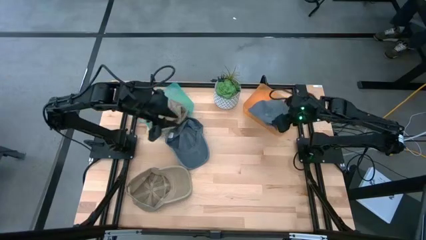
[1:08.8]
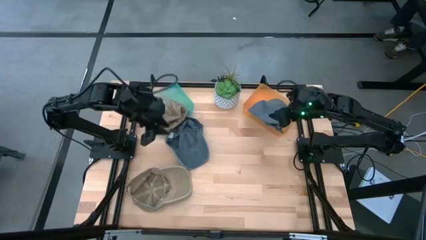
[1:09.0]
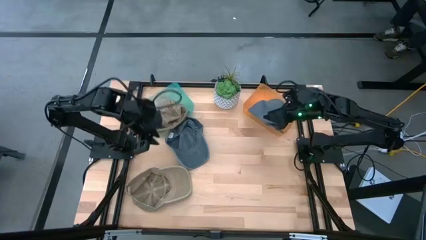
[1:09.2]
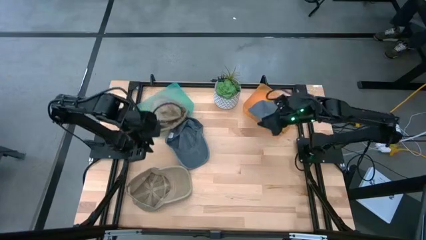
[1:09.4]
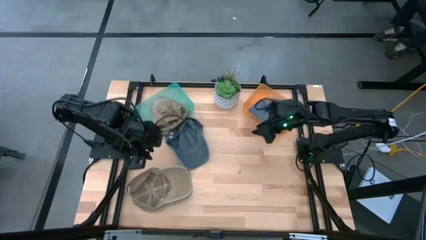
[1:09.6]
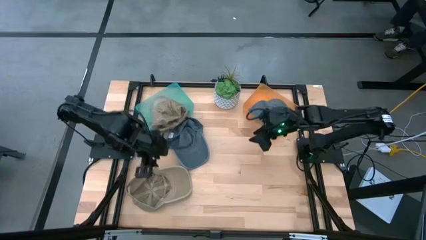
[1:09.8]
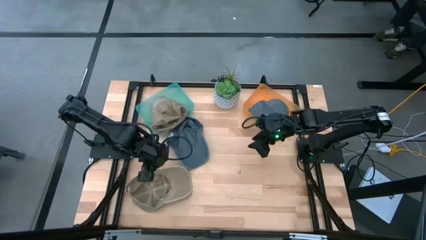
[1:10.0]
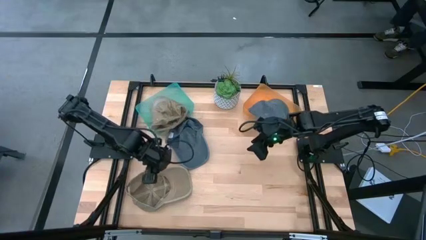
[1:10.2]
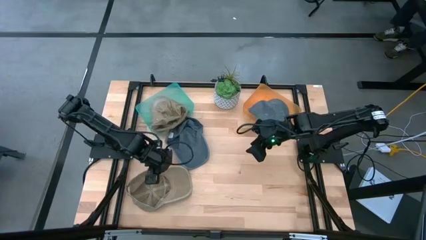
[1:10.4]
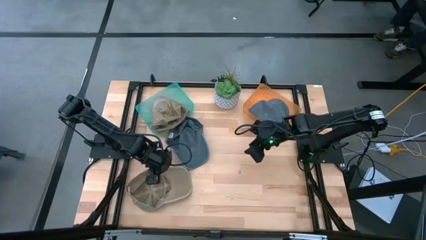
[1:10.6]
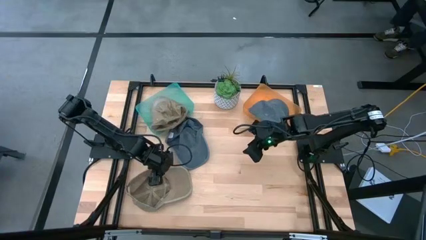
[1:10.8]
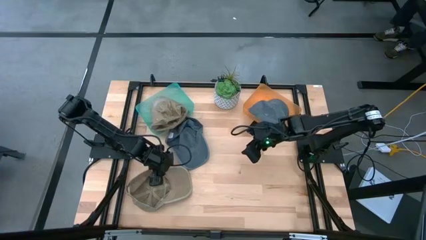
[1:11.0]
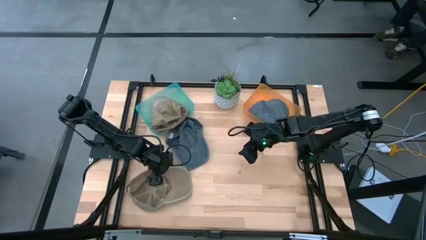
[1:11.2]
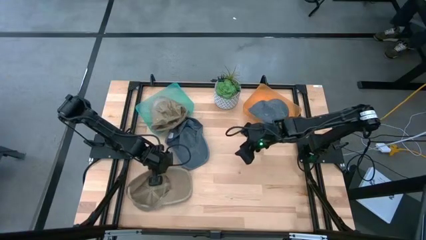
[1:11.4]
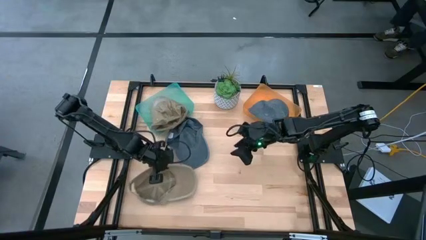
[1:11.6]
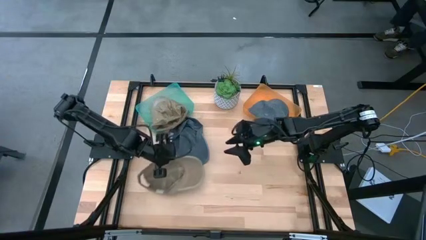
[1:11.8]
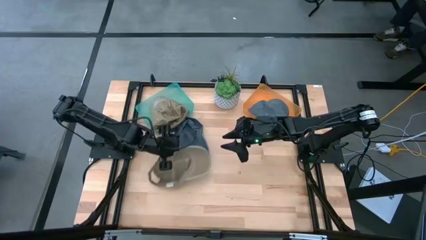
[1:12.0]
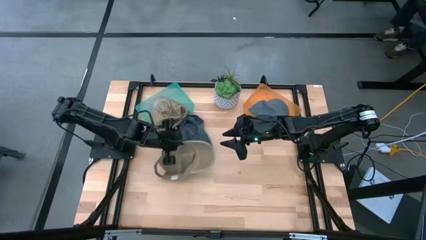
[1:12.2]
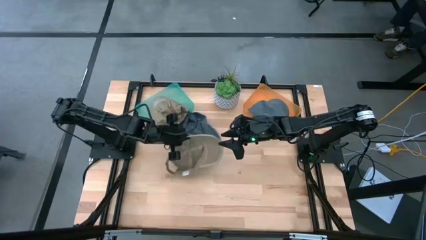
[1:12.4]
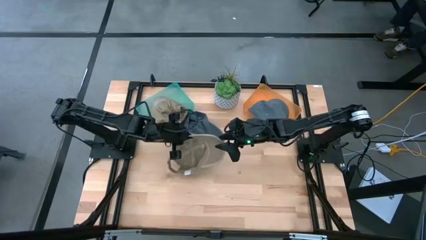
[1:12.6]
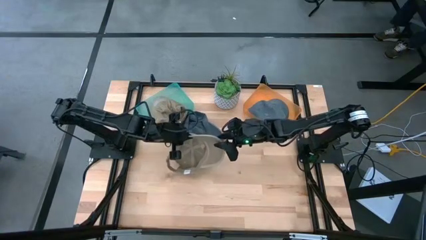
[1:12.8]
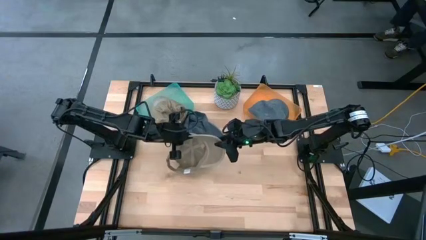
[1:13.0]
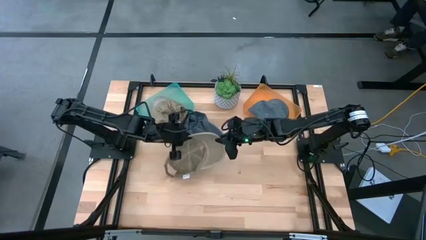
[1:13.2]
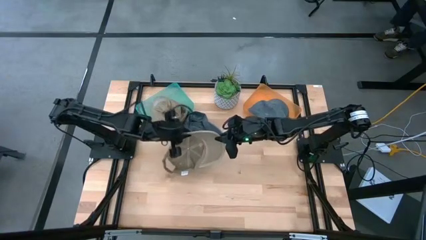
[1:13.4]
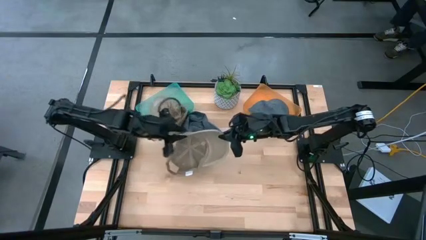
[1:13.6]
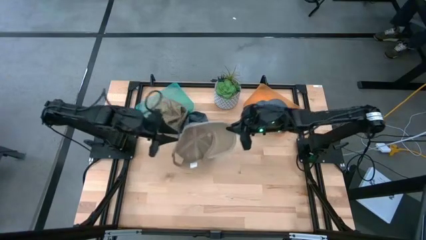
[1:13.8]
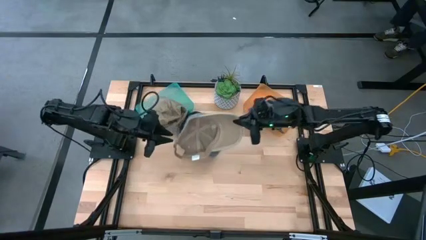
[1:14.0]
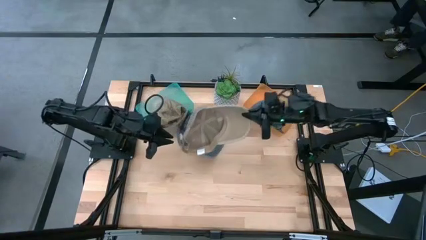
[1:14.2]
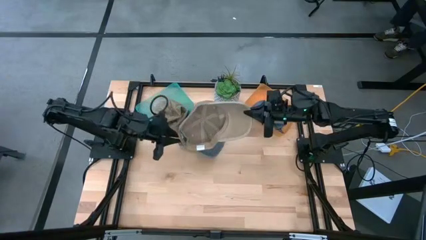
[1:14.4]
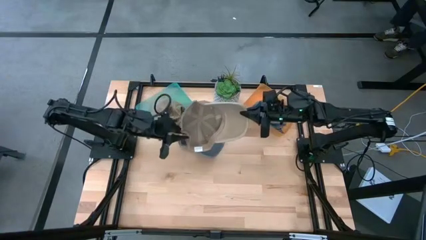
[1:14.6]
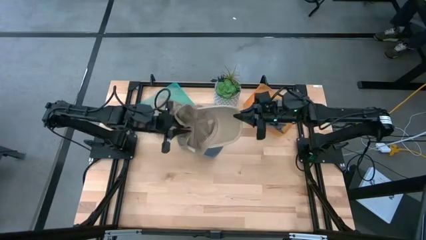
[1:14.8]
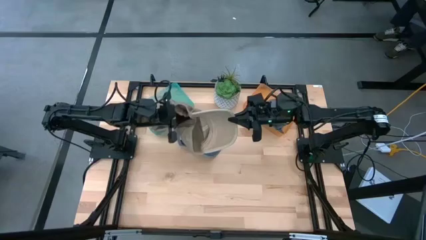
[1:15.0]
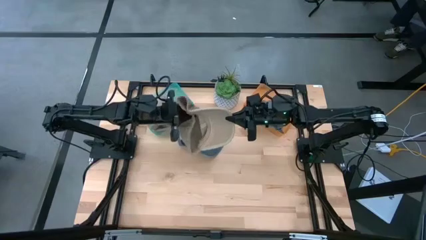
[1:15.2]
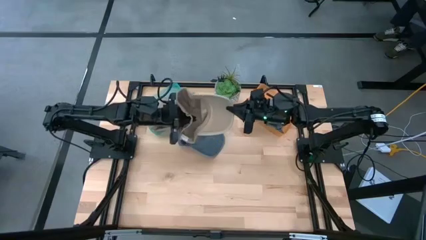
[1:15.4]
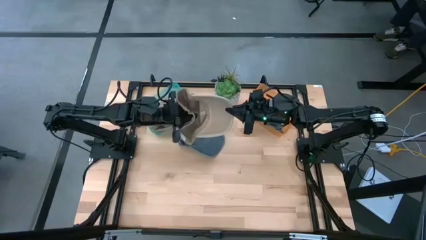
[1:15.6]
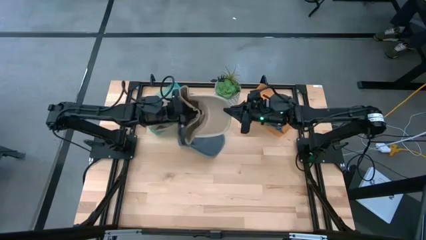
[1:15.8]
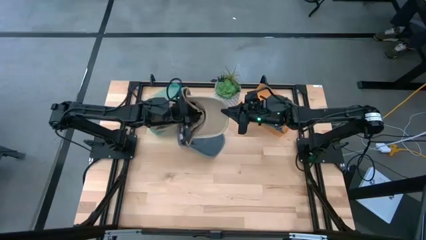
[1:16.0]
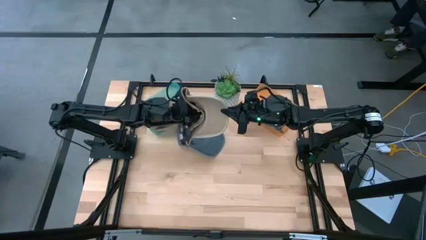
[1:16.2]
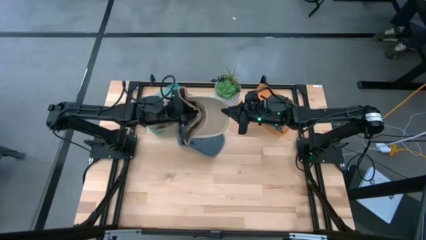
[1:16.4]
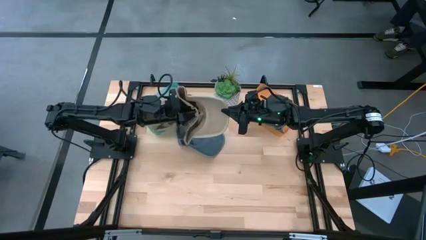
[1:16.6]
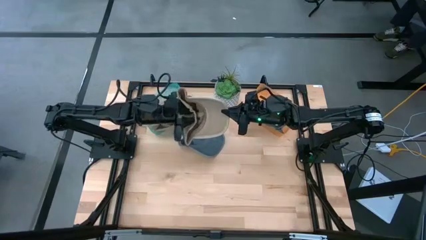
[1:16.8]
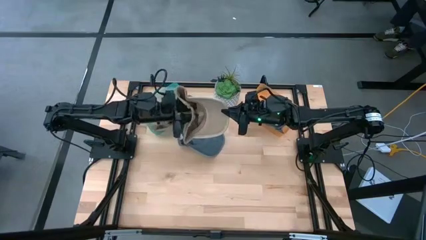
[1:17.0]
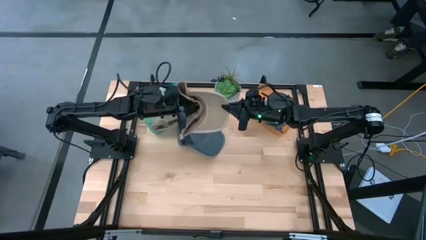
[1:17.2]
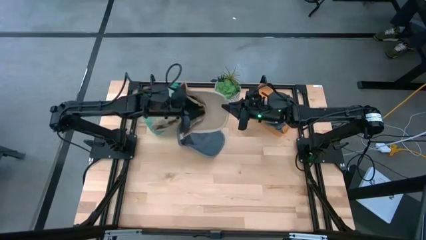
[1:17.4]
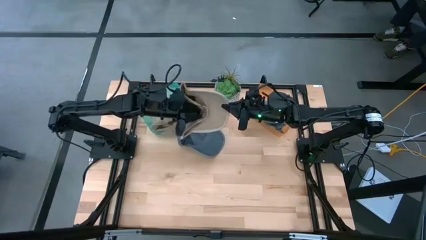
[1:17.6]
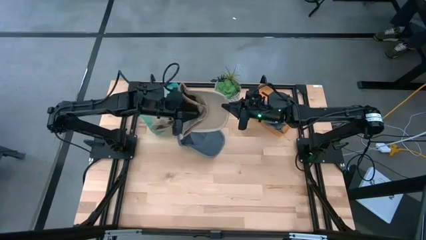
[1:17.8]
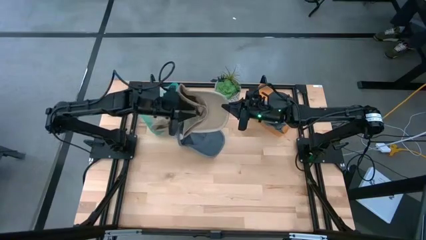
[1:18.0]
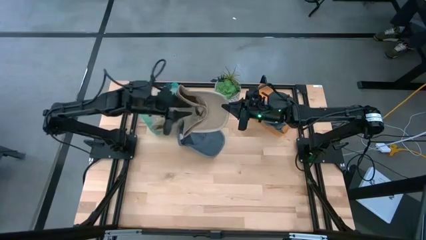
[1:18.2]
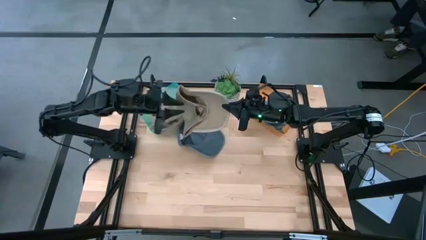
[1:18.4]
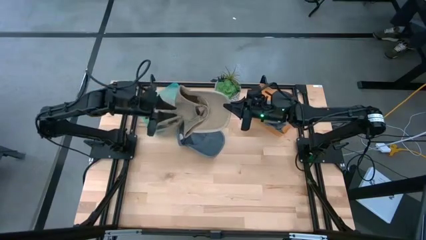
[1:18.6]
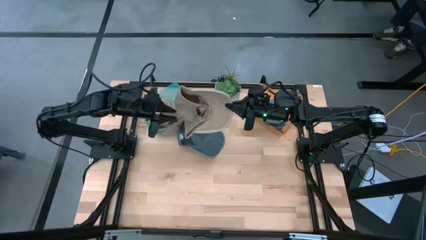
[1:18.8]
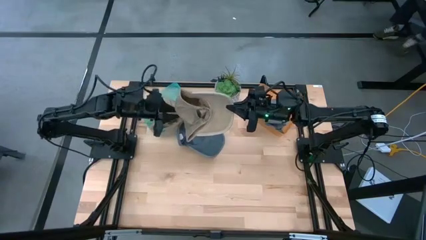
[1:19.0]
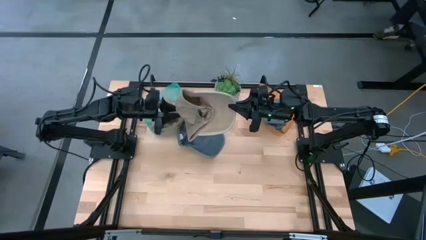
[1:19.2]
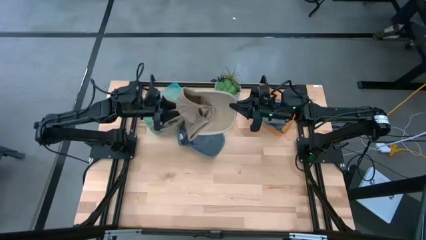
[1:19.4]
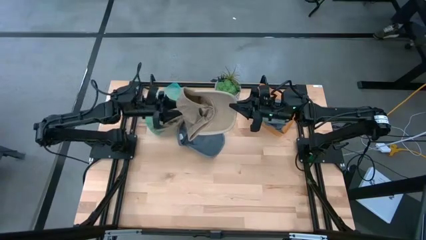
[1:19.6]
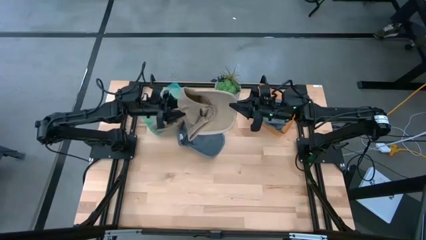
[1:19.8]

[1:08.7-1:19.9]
Task: Pick & Place hat
Put the brown cap into the green bin
